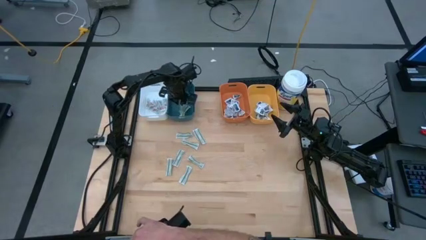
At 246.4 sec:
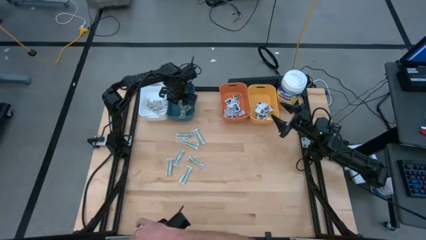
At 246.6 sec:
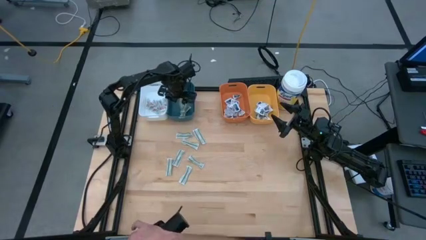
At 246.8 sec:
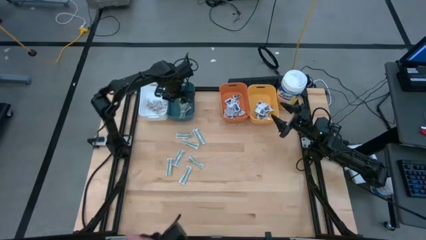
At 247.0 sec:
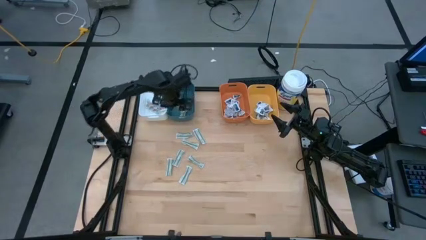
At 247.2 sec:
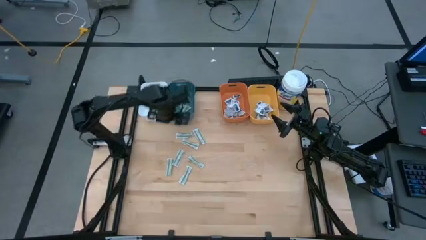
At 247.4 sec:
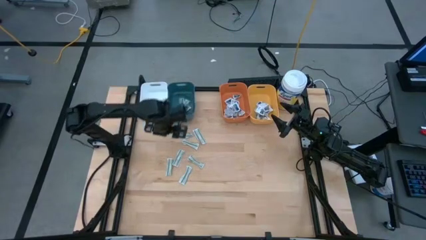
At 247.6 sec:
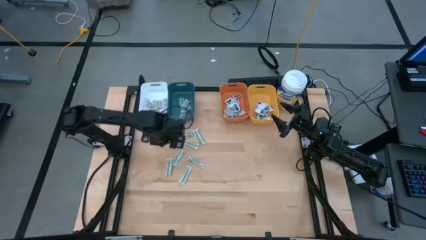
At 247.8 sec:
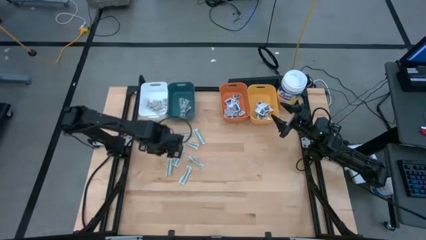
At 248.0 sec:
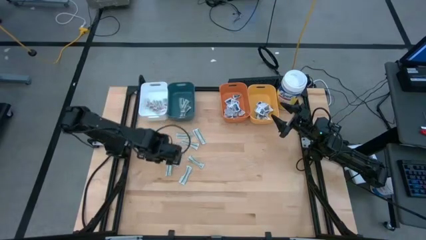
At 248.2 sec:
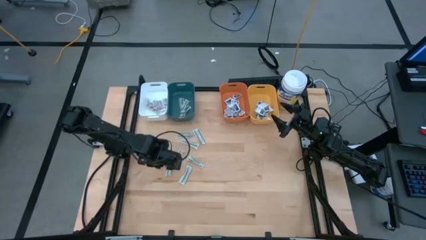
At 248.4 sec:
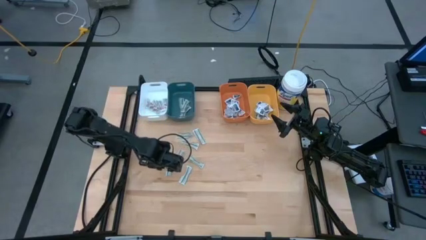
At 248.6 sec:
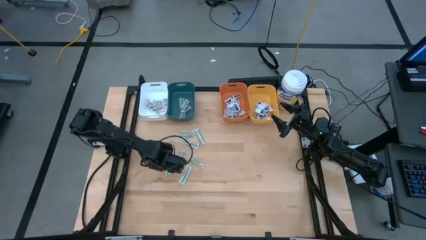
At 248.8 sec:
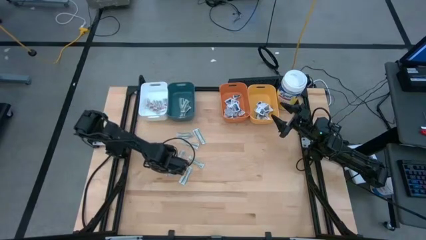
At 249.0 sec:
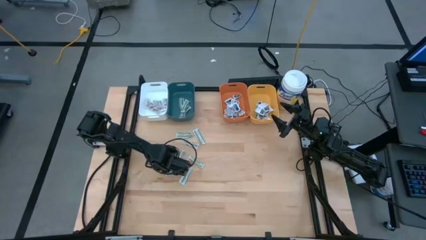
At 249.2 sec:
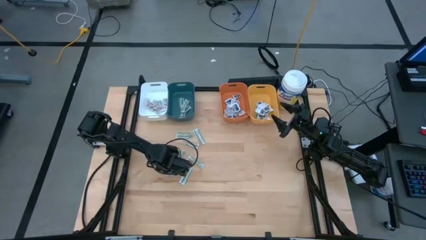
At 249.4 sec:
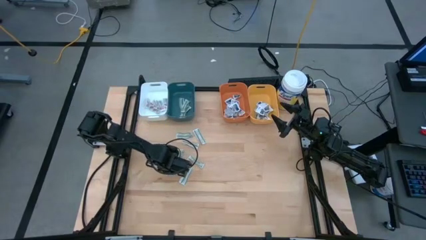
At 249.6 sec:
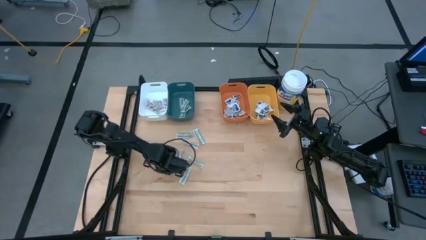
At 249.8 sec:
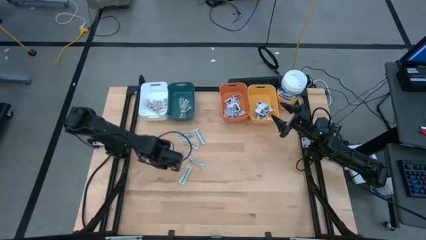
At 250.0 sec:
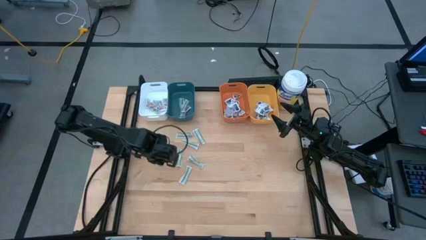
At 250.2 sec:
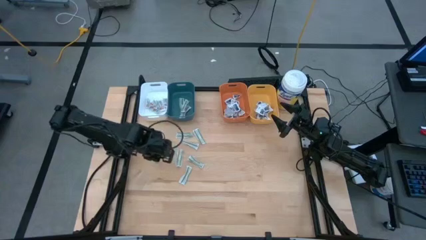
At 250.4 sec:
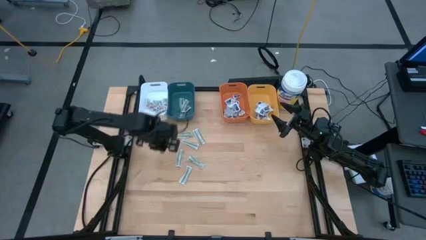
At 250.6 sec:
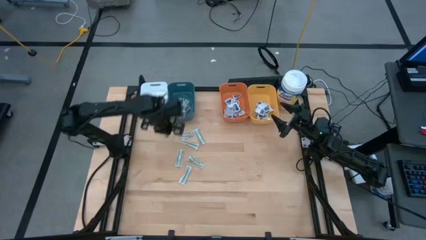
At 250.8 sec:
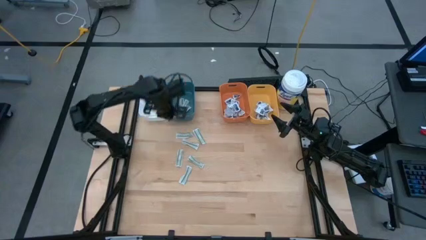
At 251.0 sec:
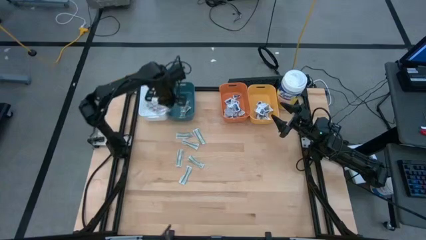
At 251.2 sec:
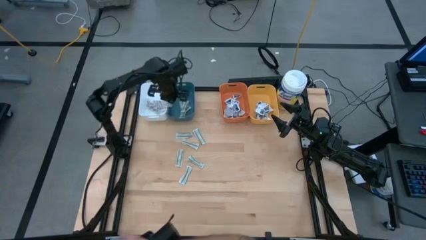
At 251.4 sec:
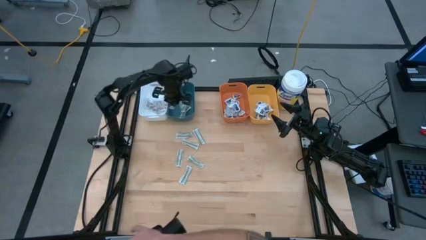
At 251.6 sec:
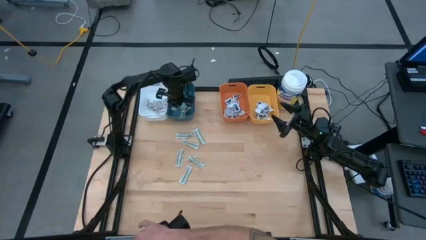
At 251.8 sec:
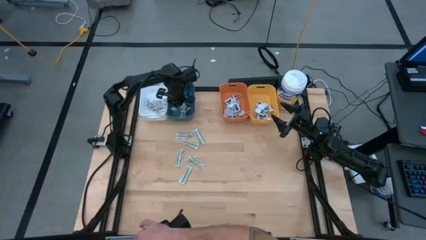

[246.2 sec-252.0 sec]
Task: Pick & Place First Aid Supplies
Put the bandage pack into the blue bin

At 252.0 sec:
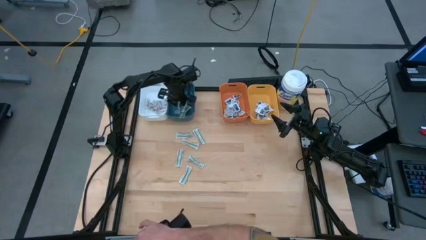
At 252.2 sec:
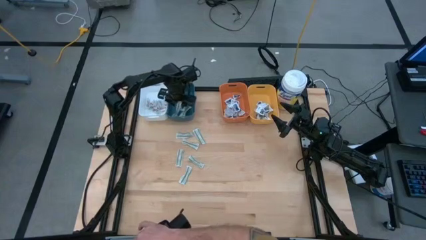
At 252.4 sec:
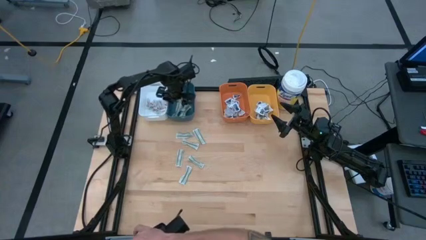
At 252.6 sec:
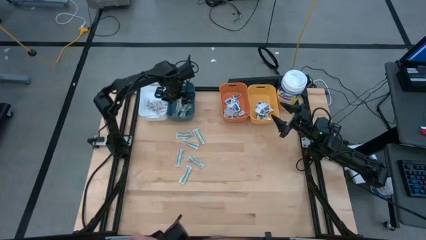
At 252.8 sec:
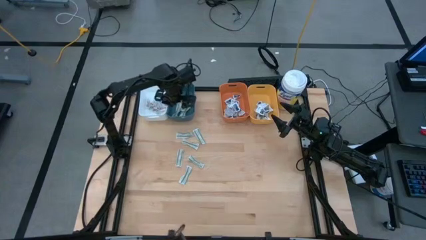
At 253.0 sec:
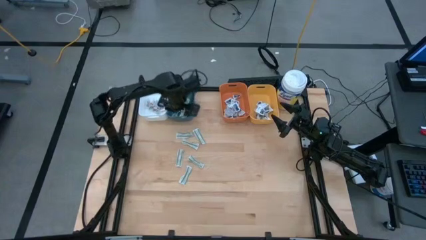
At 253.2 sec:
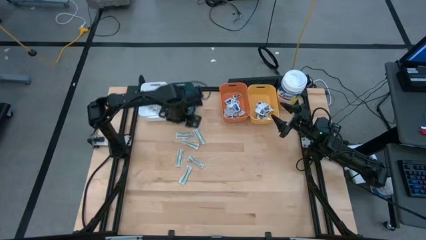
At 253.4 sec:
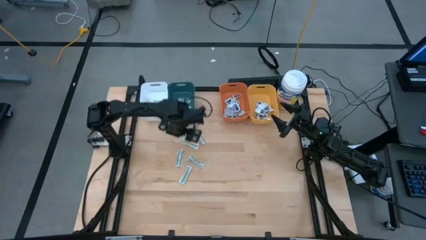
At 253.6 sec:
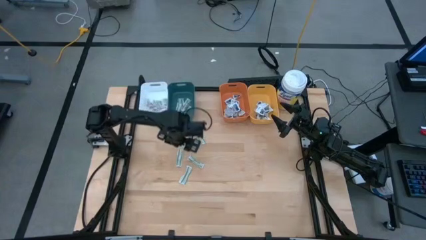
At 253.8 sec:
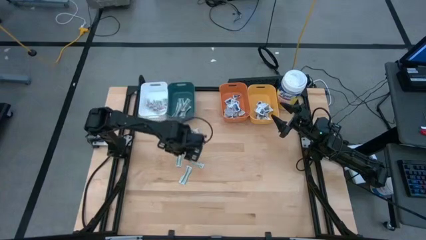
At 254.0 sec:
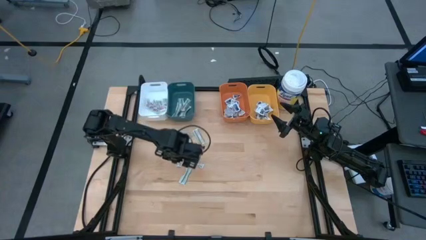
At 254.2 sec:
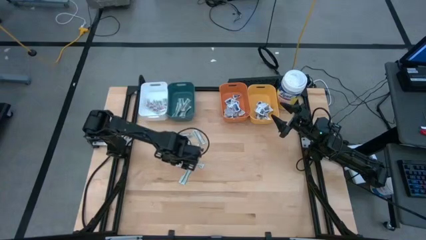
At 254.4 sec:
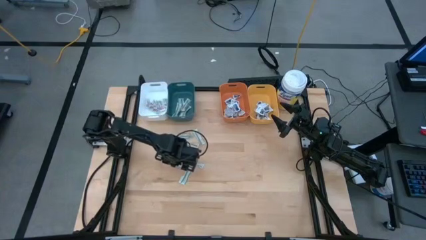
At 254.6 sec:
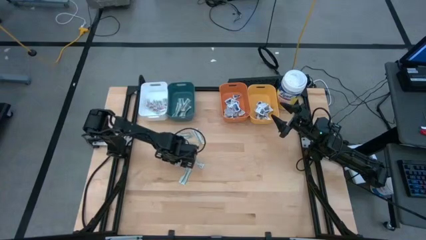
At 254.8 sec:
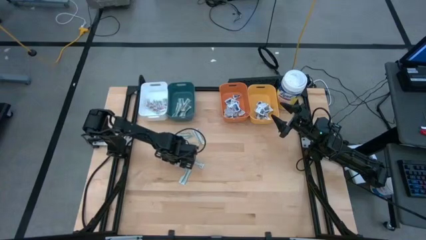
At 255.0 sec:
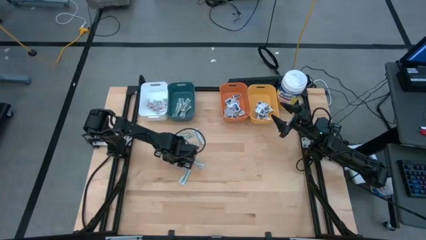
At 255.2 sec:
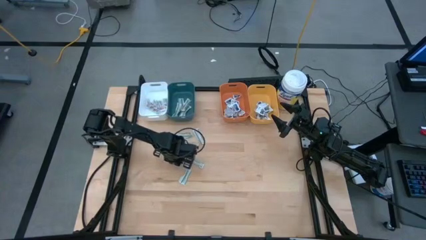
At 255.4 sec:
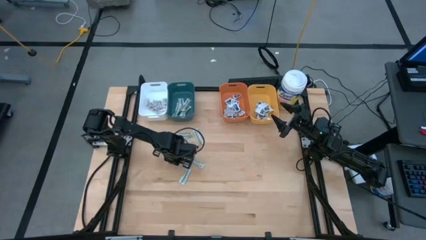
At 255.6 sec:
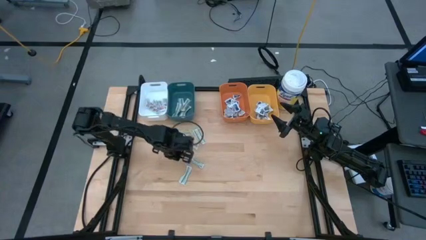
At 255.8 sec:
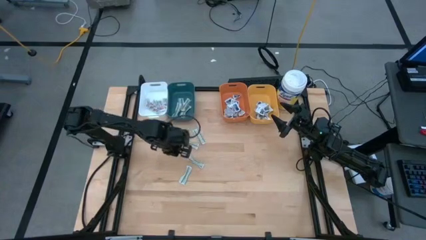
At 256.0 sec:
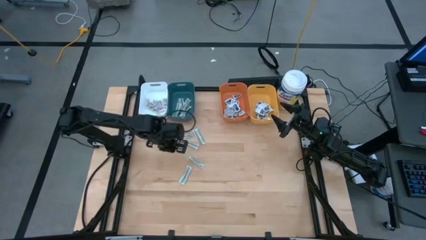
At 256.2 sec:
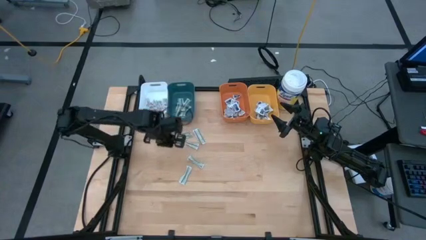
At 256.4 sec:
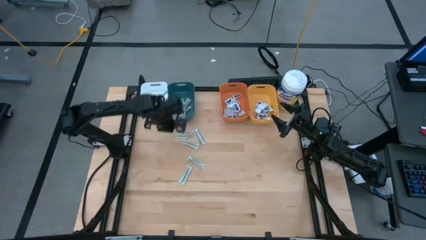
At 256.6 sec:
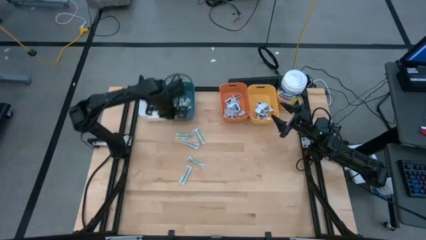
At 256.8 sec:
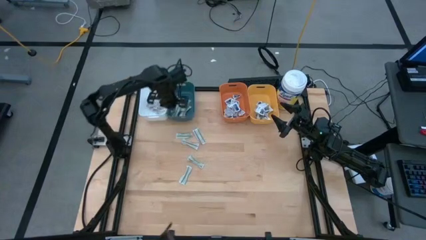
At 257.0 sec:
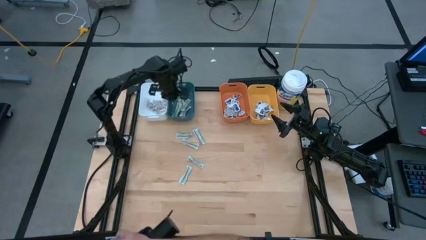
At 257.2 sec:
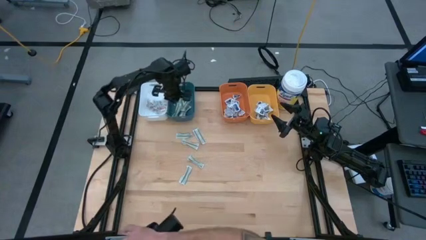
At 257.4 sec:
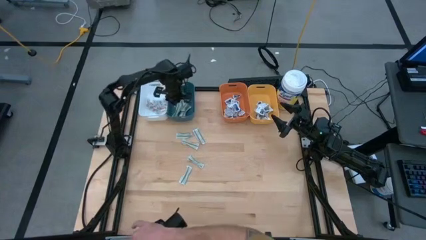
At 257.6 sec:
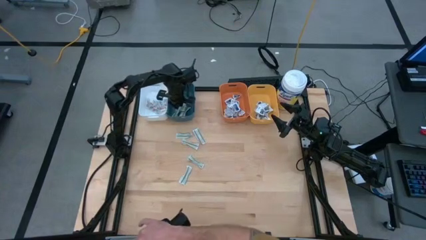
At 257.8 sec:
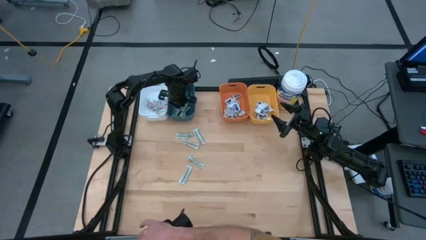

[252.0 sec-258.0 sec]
Put the bandage pack into the blue bin

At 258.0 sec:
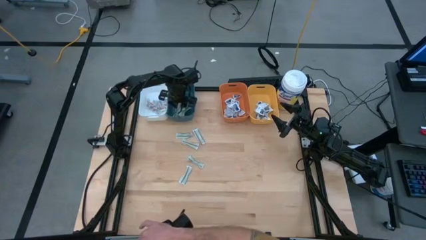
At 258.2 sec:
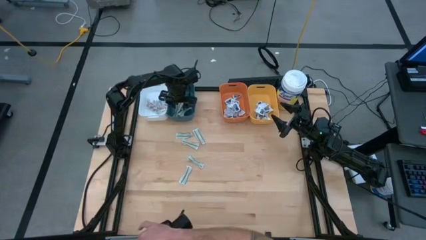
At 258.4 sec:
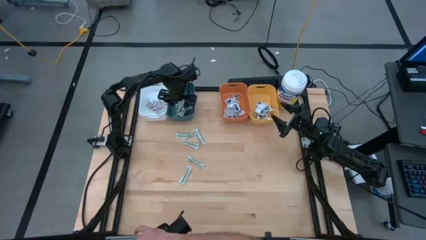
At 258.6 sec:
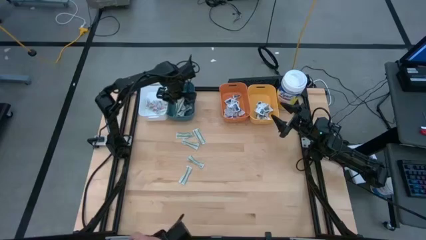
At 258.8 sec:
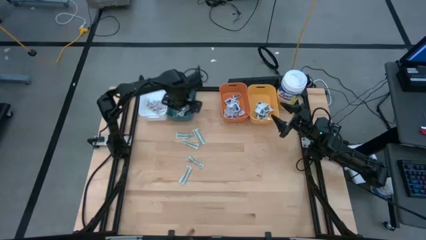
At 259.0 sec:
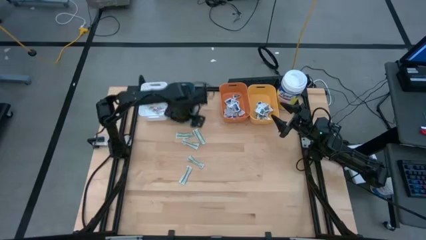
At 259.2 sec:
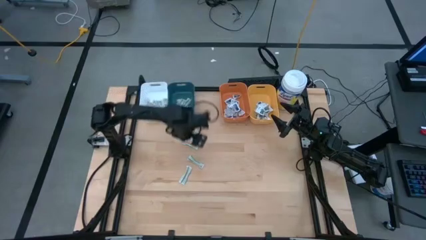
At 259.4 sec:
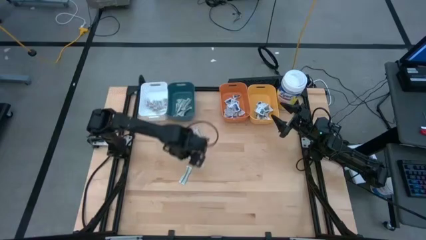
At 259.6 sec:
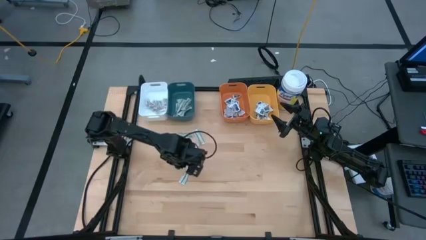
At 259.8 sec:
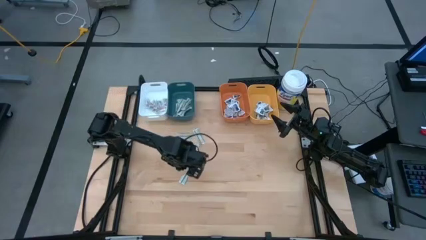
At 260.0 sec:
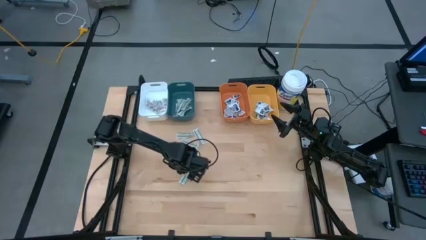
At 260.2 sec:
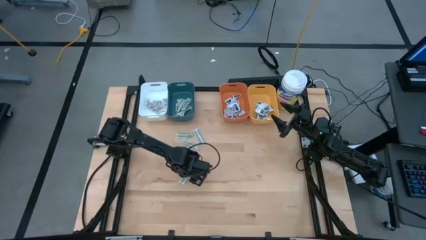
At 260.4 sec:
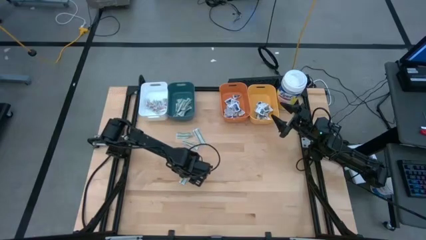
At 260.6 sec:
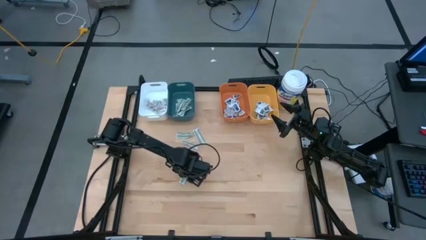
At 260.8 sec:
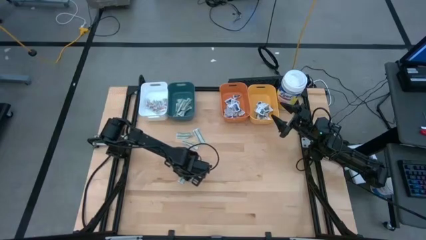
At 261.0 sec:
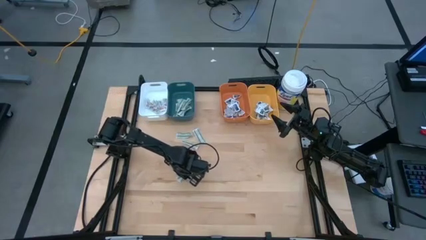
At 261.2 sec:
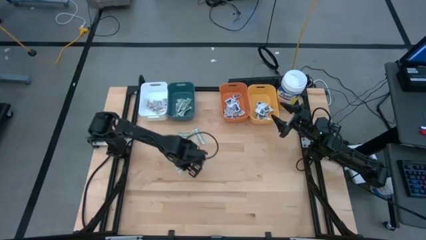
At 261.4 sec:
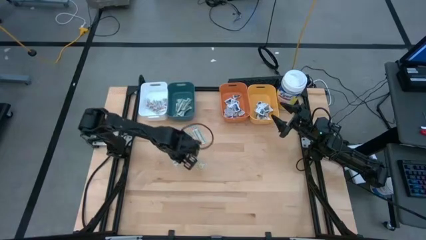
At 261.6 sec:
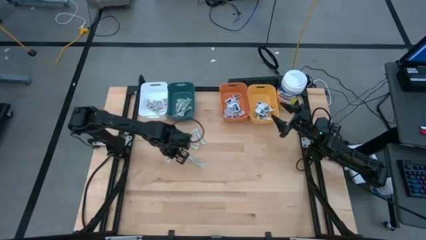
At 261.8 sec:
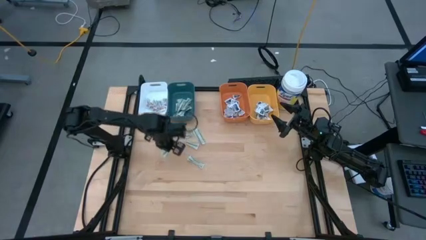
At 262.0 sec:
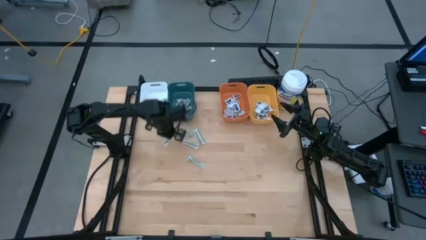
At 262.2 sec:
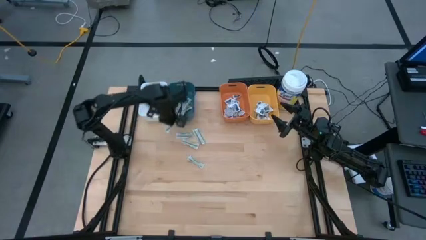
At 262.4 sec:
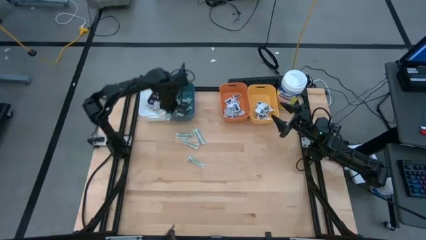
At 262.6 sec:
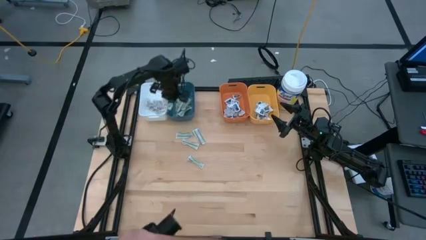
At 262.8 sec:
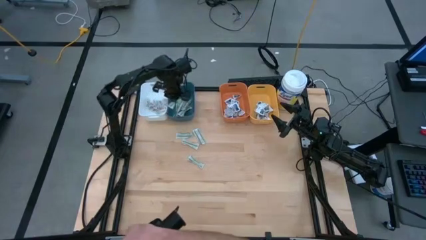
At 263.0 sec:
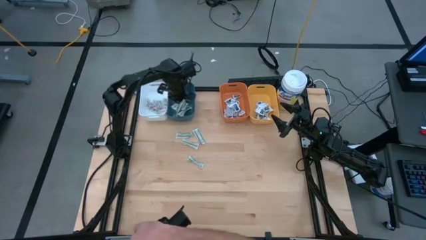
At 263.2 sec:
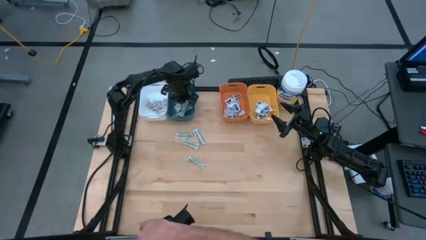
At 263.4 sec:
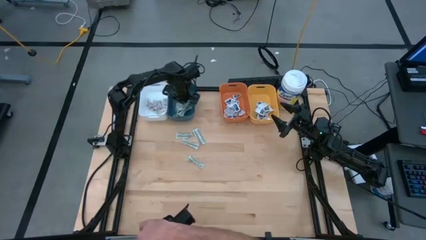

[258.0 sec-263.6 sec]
Put the bandage pack into the blue bin
